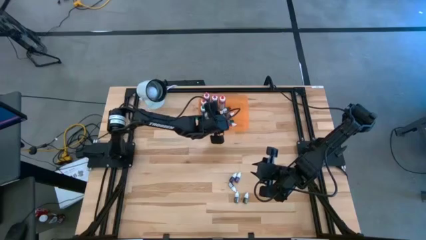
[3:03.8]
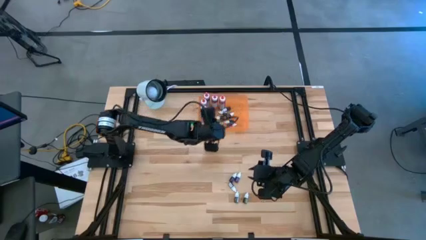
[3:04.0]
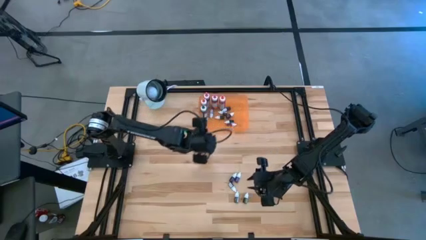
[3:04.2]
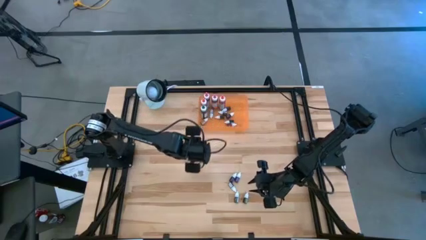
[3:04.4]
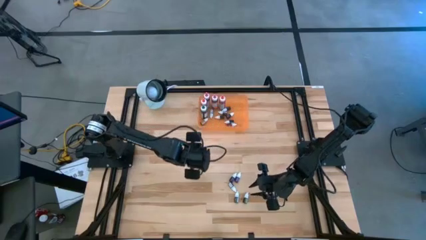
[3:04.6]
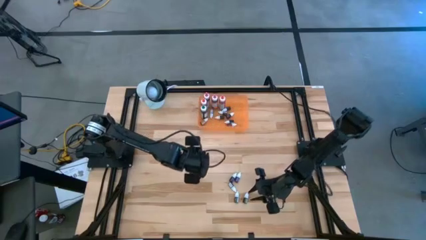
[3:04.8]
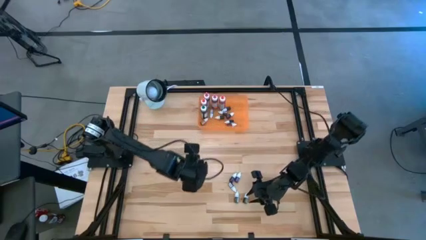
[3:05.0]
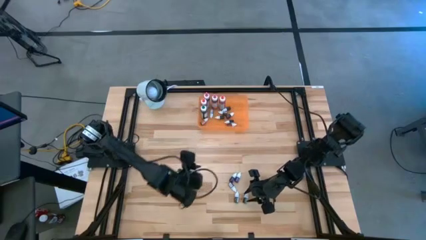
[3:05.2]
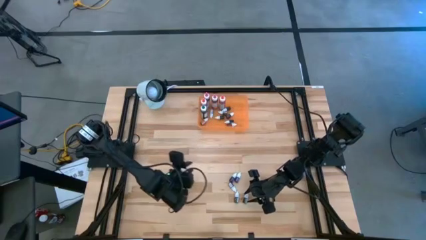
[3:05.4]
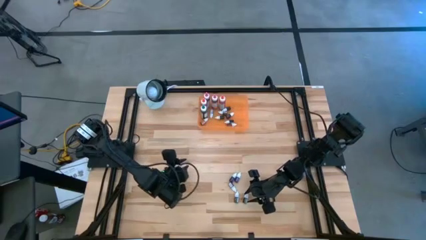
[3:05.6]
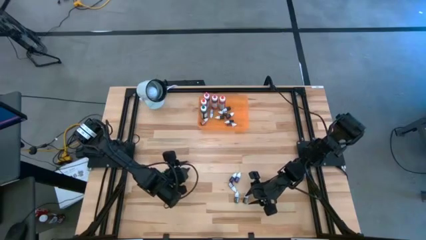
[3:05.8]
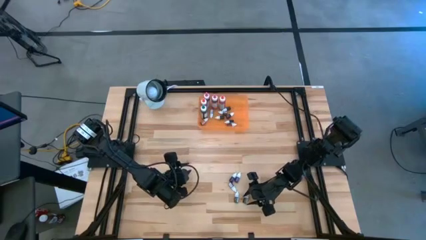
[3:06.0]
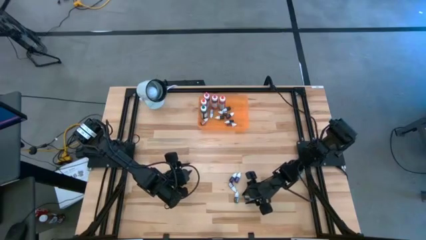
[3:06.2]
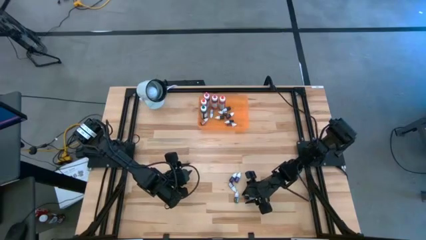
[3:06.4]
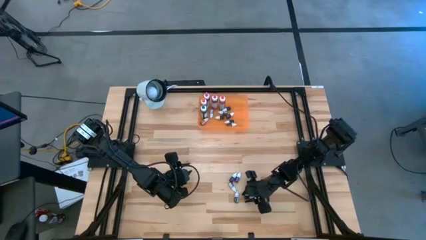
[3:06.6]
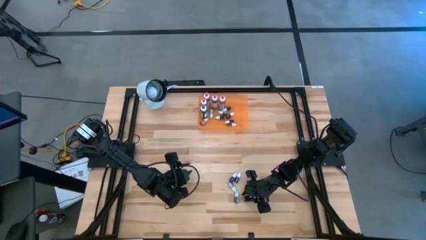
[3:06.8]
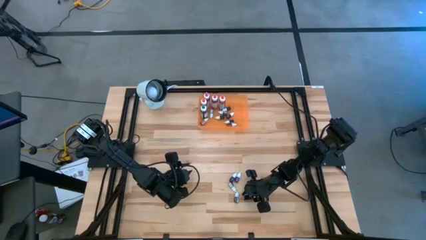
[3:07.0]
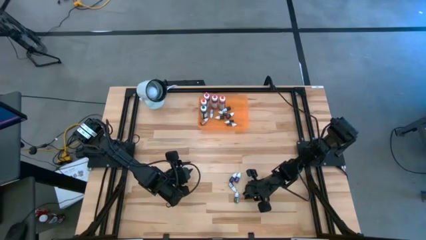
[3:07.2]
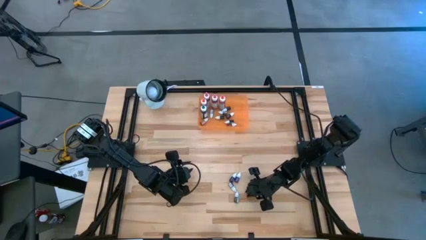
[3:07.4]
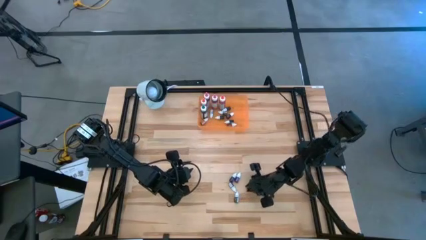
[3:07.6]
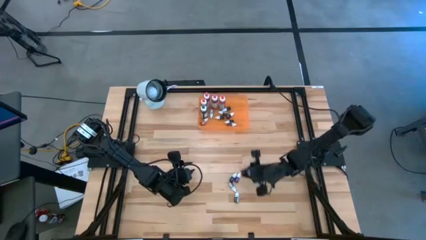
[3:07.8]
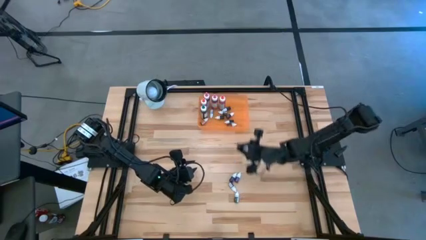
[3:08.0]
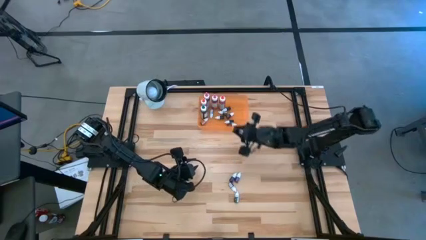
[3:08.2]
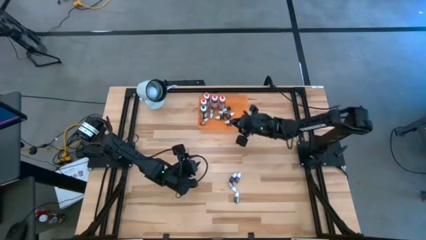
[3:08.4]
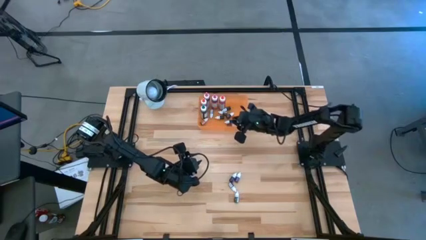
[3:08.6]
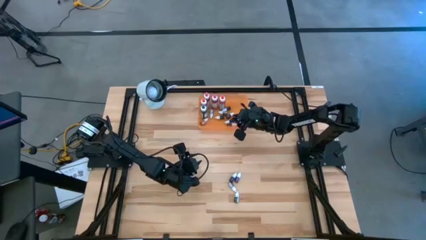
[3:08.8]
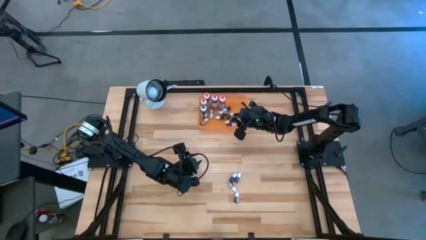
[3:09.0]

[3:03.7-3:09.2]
Task: Pick & Place food coloring
Put the green small food coloring bottle into the orange bin

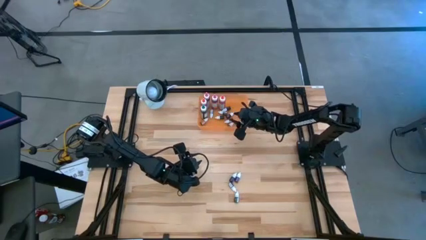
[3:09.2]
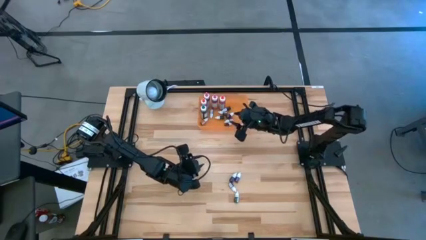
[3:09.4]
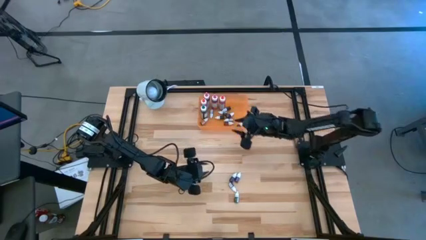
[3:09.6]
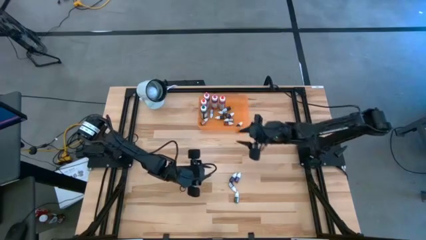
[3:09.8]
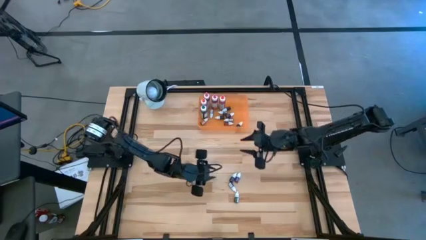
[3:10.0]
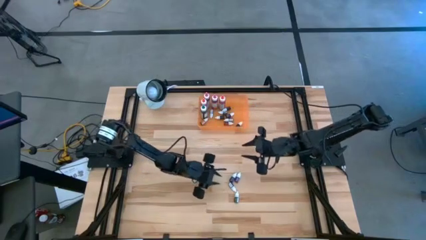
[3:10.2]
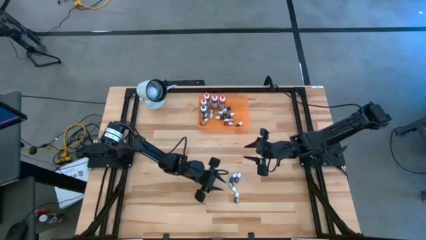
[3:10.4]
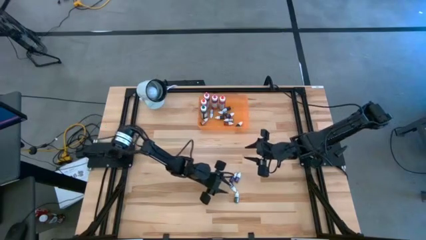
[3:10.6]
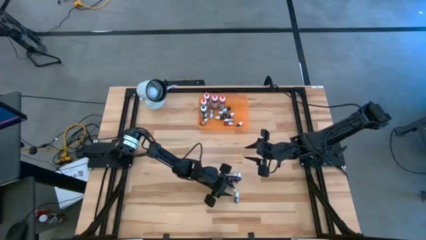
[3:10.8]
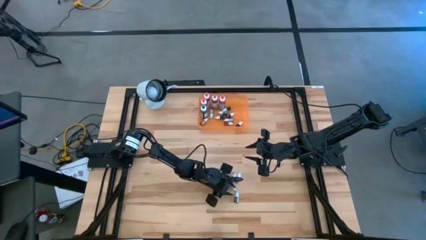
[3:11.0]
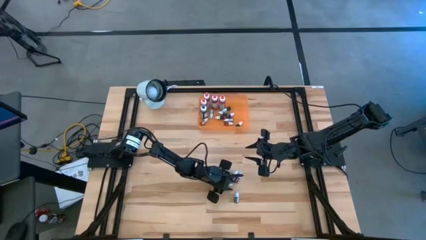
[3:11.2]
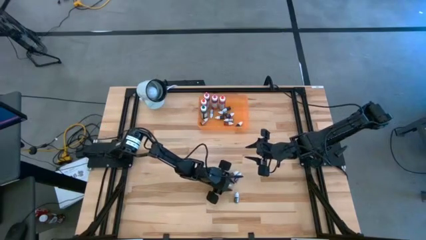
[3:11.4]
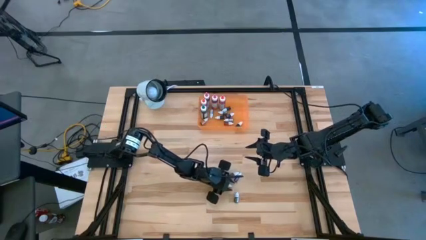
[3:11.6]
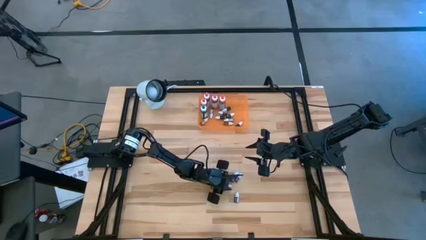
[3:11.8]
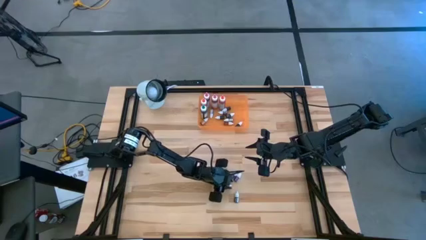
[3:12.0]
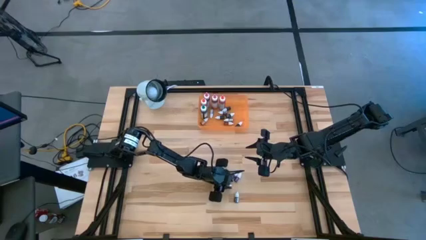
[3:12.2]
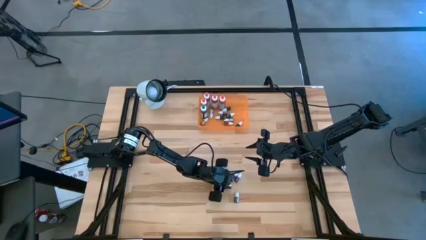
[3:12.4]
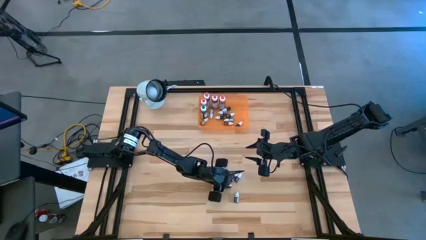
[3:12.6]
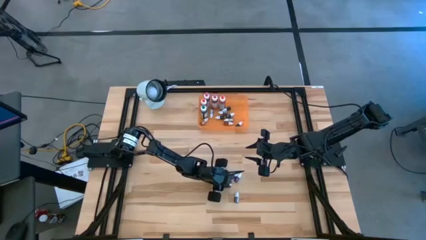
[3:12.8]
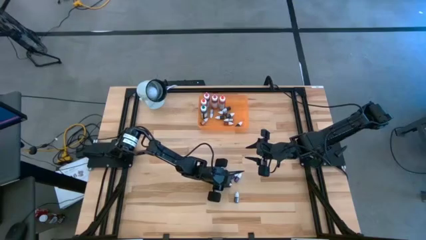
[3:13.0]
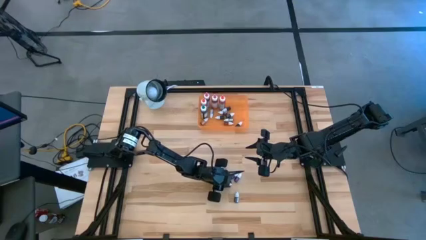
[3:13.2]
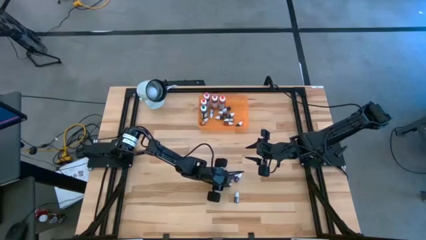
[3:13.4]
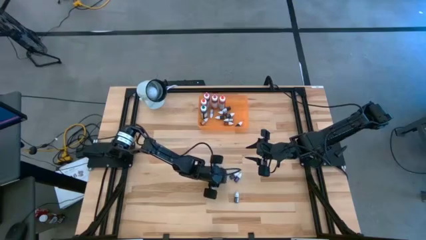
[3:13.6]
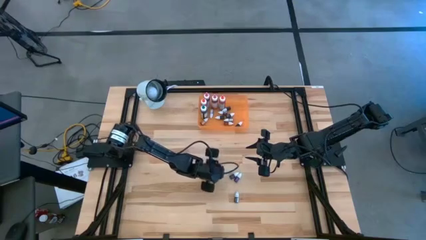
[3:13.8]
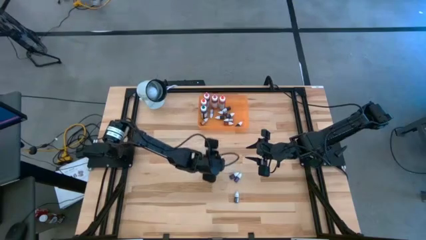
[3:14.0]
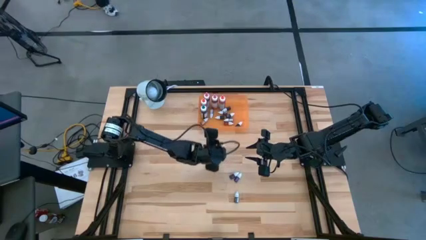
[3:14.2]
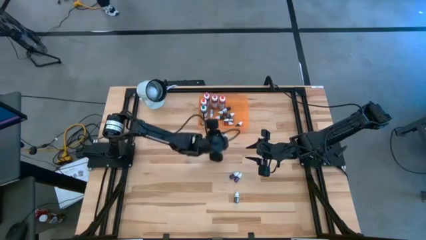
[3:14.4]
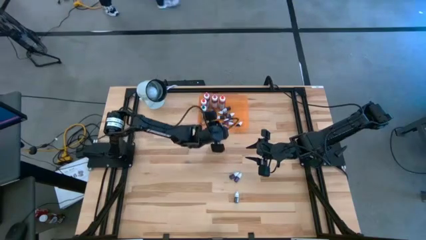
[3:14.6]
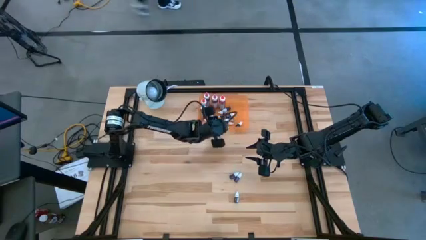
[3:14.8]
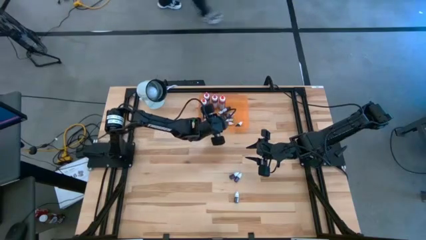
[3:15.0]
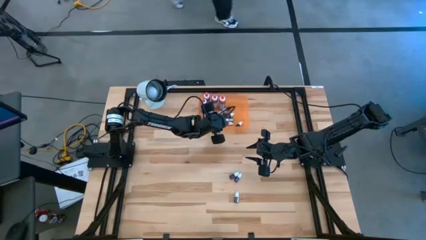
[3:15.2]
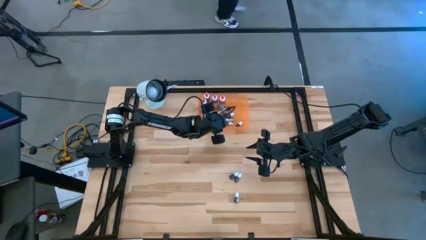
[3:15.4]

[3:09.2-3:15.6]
Put the black small food coloring bottle into the orange bin
